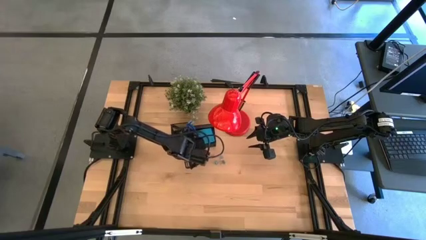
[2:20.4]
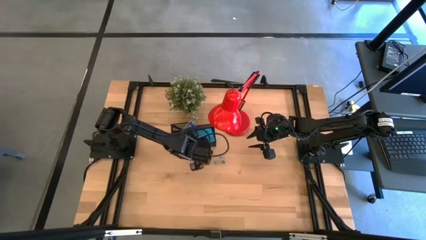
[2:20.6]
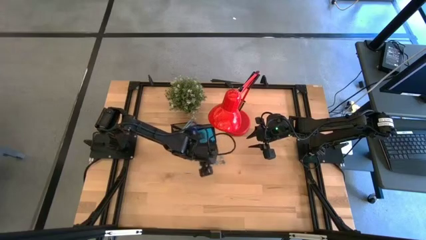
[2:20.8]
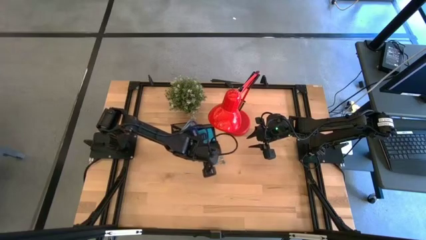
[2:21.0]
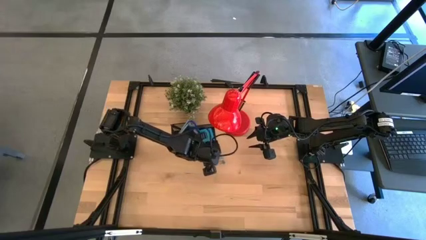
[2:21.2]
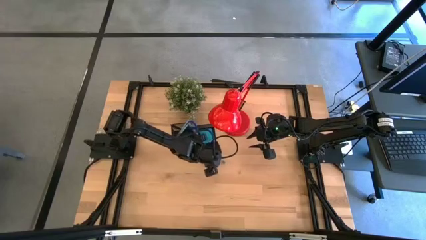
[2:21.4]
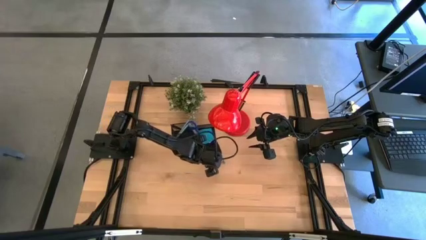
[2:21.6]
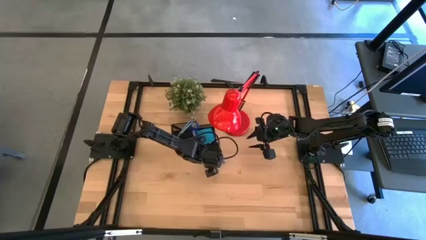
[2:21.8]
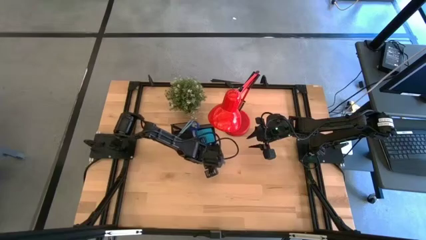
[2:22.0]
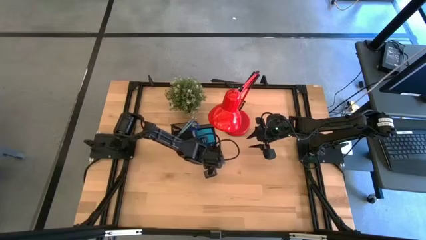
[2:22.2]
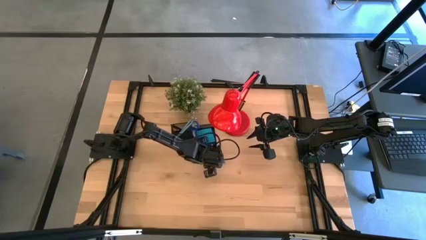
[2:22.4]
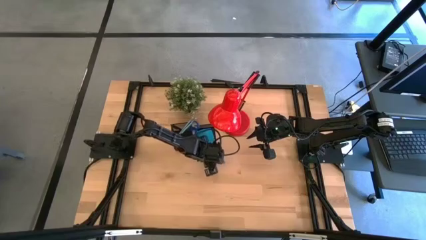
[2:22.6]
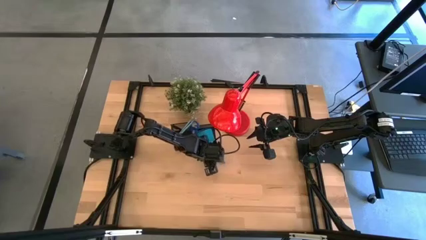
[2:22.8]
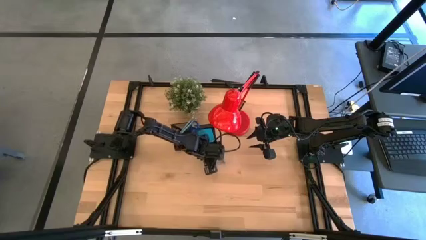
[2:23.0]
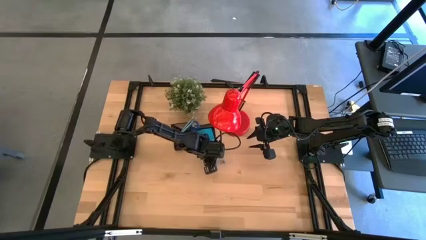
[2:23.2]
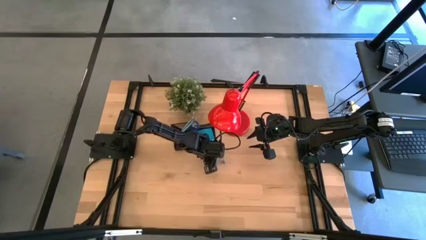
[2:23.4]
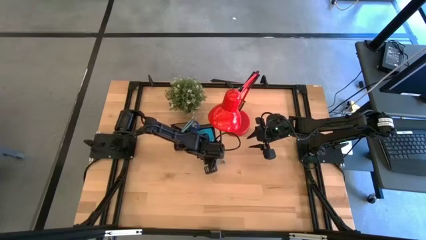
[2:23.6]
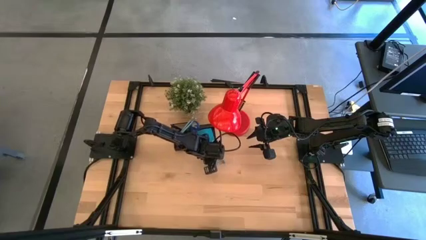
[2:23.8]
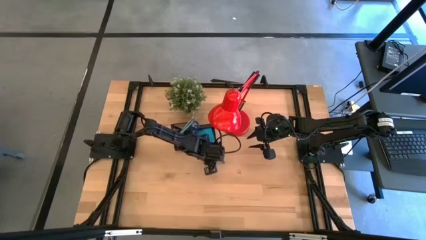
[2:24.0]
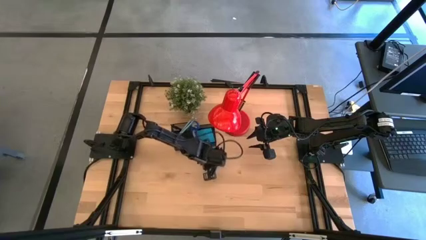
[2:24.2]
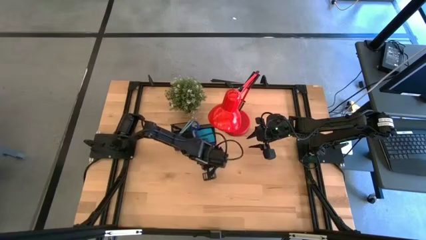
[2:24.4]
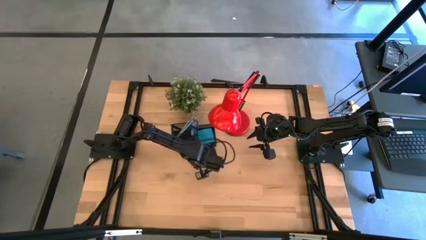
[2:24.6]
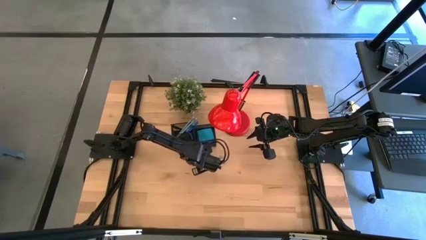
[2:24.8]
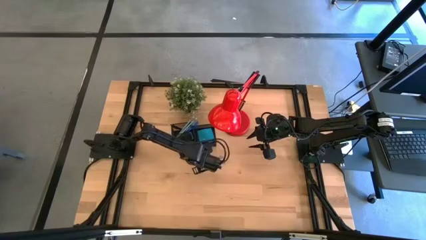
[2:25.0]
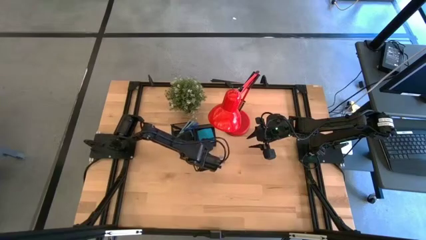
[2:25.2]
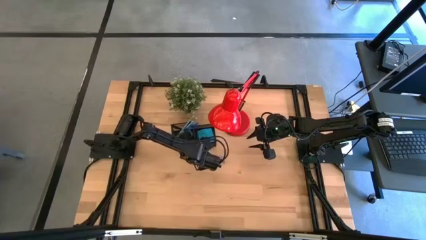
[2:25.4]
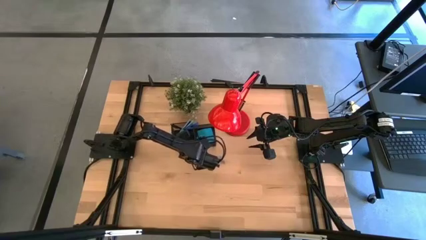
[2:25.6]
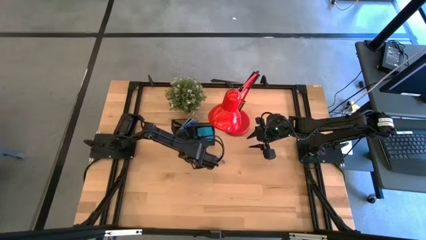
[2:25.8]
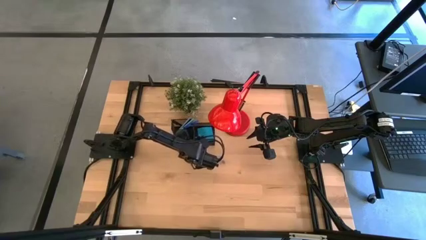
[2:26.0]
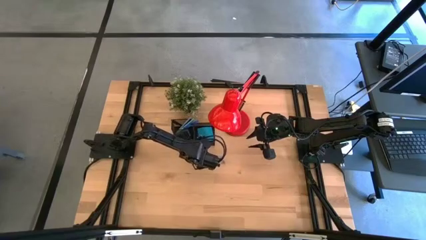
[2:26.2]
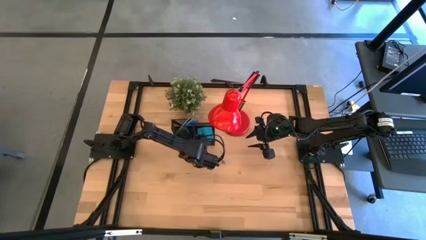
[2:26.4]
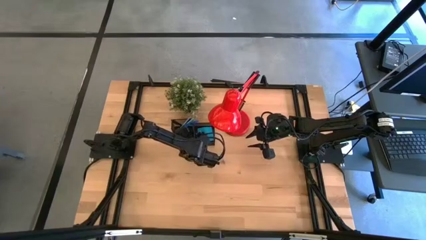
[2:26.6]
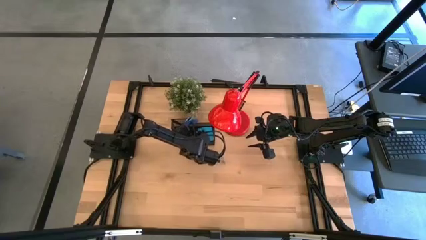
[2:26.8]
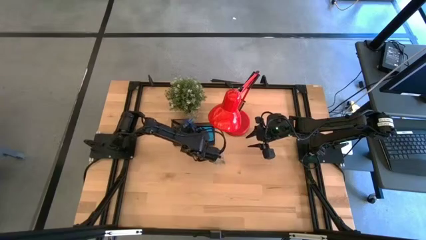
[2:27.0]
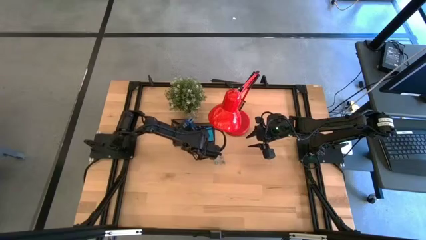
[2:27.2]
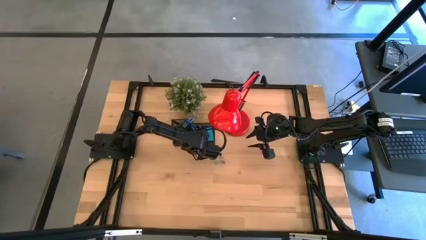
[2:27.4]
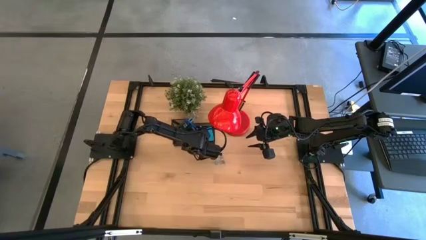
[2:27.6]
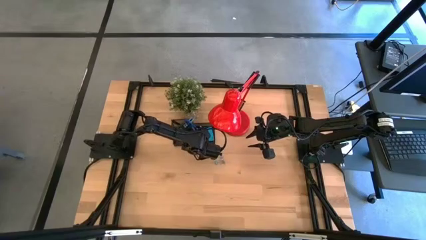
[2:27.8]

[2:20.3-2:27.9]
Task: Pick and place office supplies into organizer
Put the pink binder clip into the black desk organizer

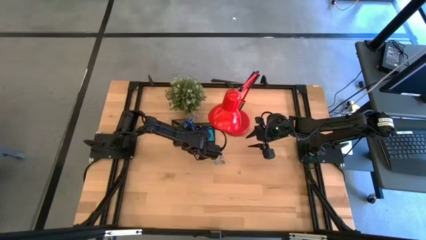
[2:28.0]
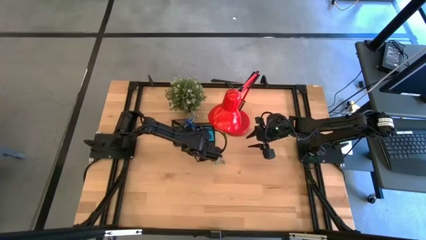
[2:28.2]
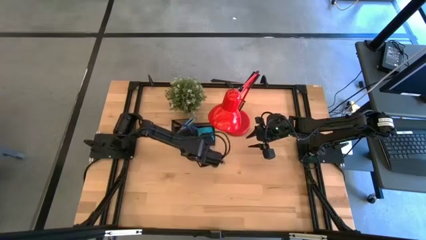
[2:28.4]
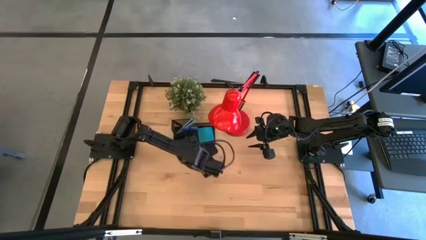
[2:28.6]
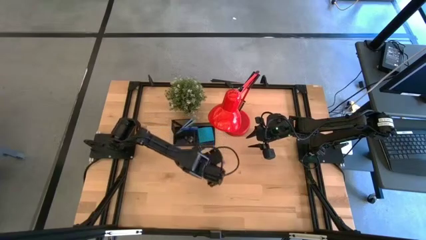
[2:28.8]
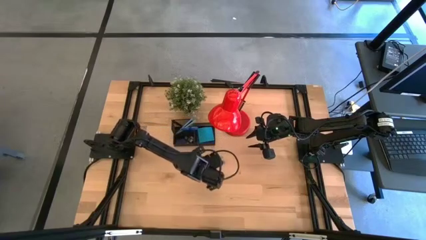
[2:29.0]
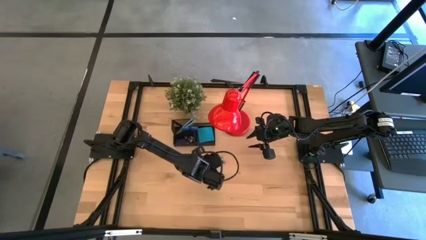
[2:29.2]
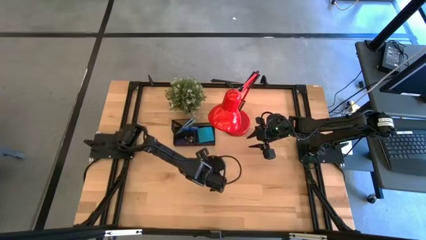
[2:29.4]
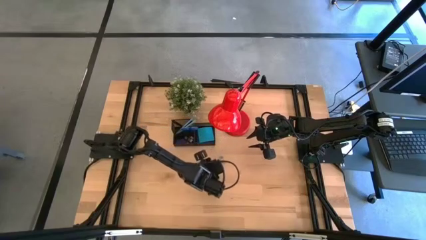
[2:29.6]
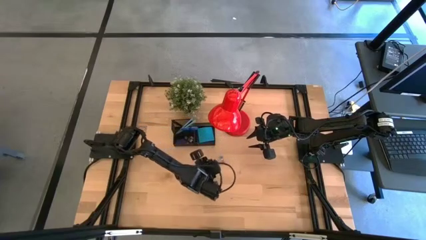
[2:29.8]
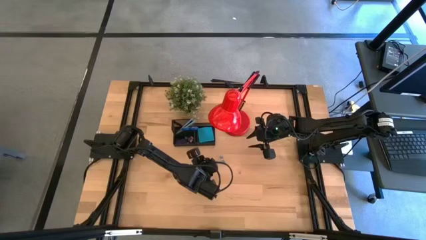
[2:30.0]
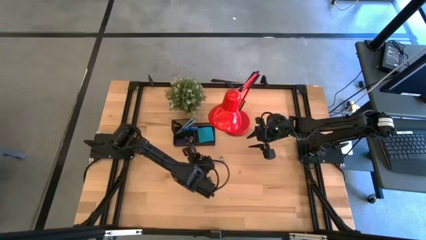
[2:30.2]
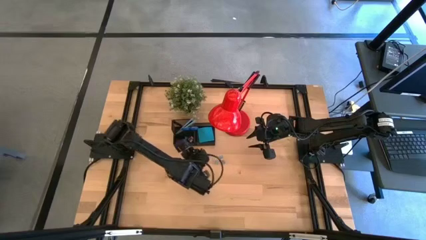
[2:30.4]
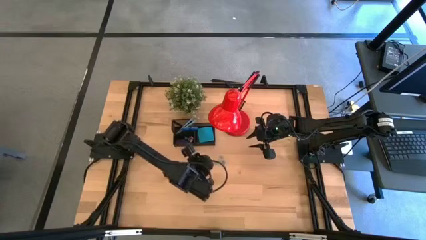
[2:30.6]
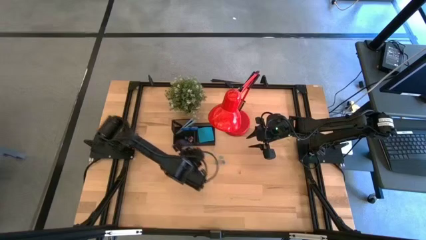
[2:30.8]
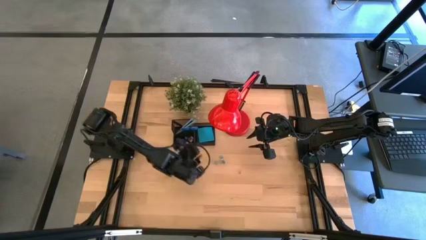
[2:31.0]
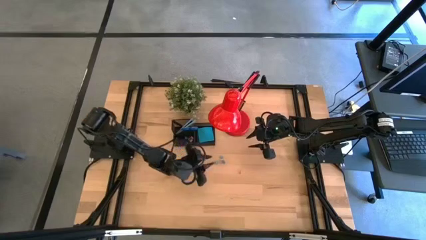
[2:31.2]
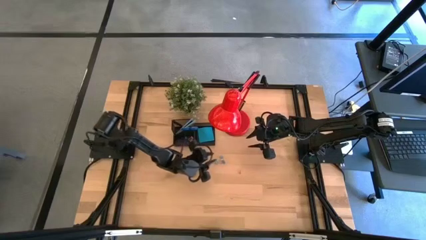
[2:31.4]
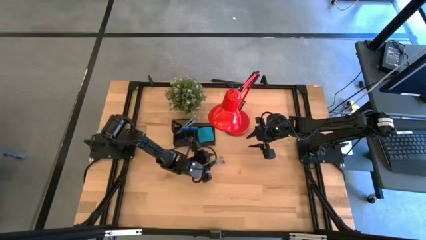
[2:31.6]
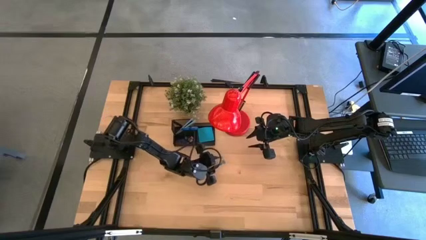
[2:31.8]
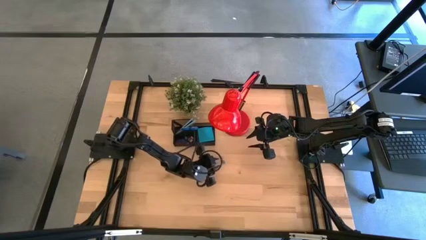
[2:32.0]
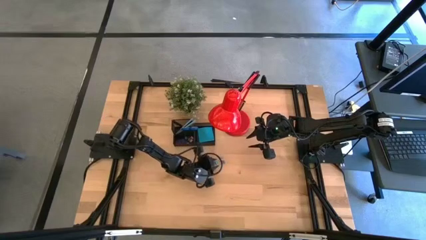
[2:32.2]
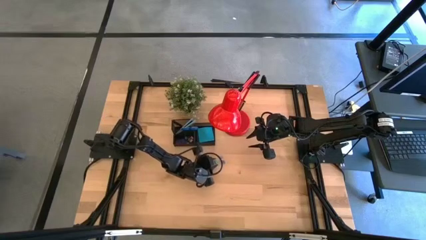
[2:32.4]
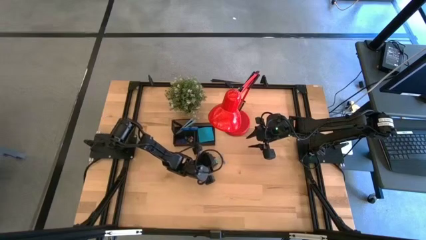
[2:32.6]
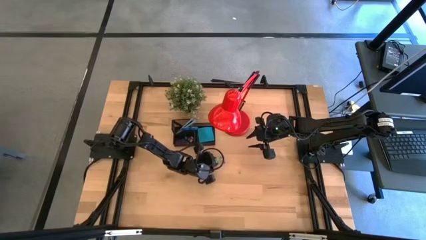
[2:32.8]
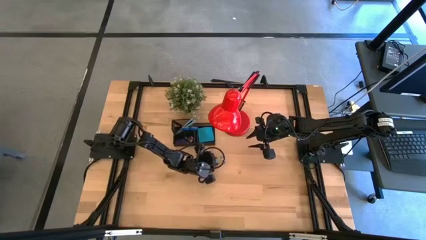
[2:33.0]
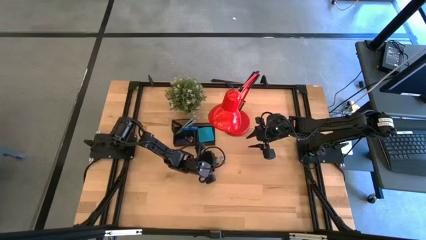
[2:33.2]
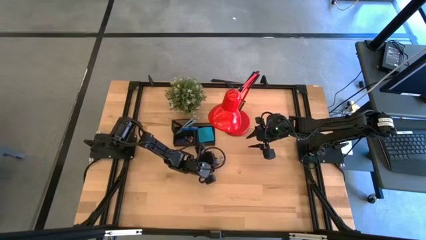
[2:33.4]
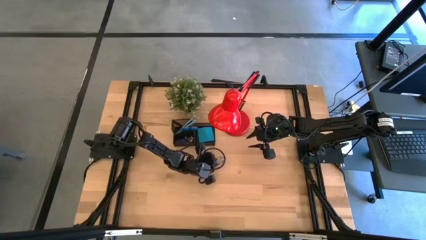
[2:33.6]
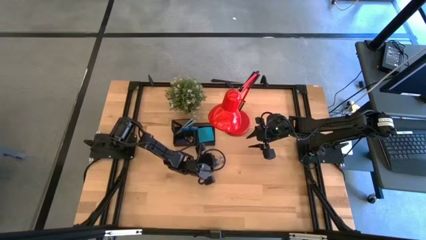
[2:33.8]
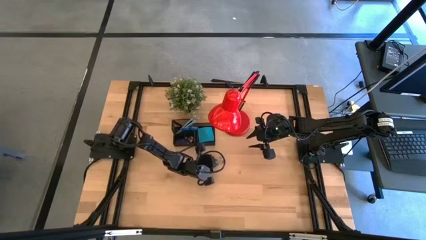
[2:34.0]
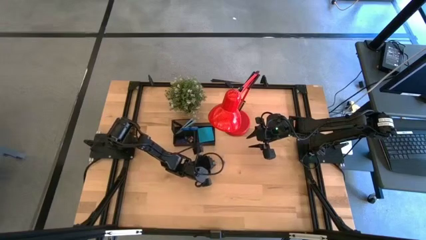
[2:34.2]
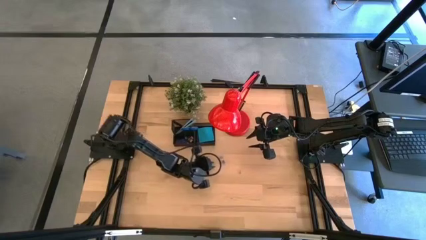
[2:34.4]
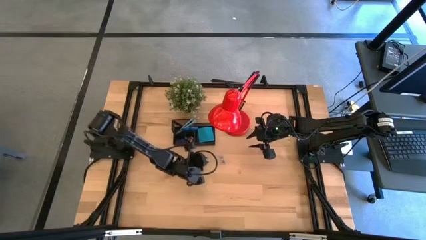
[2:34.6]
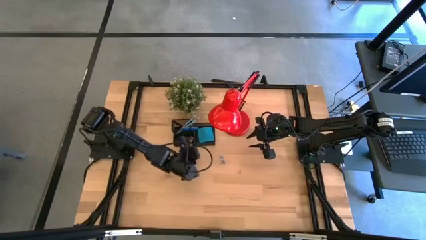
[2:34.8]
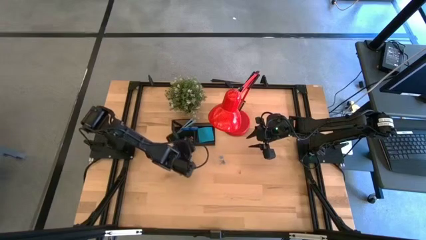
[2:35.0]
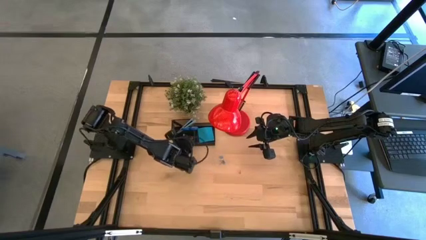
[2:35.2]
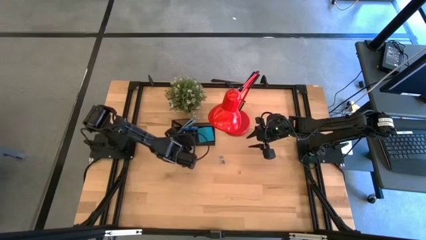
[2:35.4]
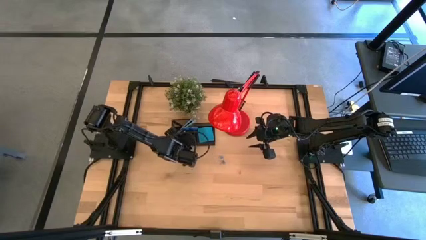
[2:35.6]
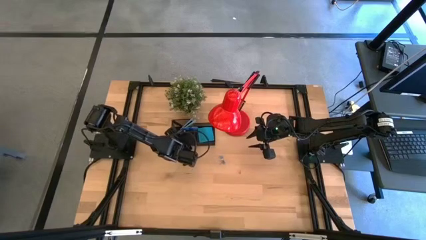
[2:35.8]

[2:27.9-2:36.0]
Put the left blue binder clip into the black desk organizer

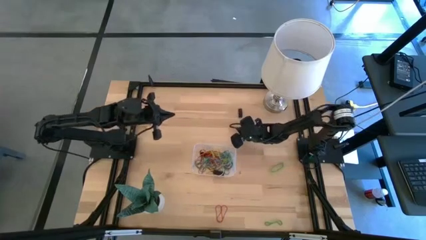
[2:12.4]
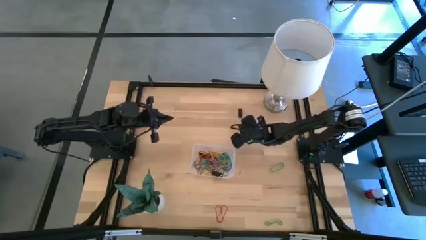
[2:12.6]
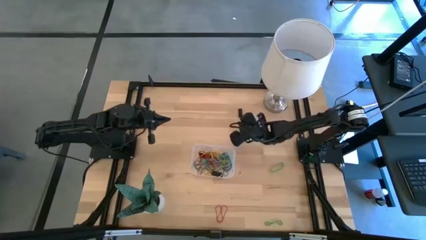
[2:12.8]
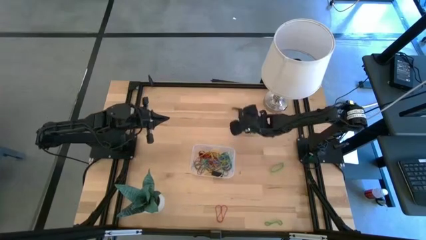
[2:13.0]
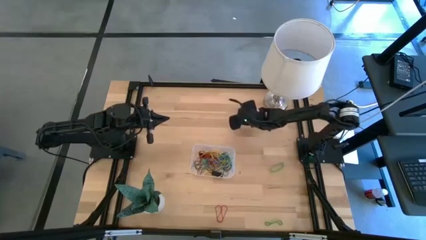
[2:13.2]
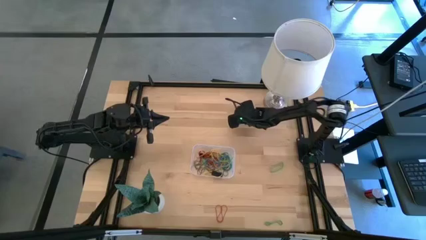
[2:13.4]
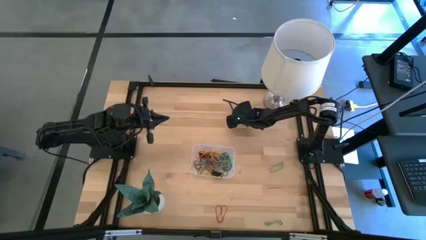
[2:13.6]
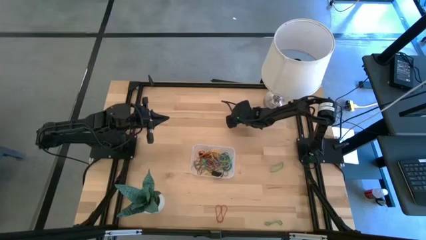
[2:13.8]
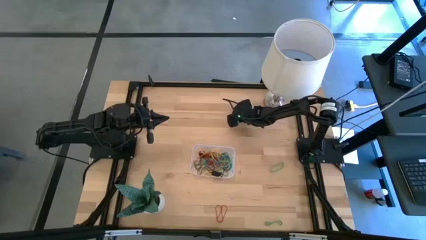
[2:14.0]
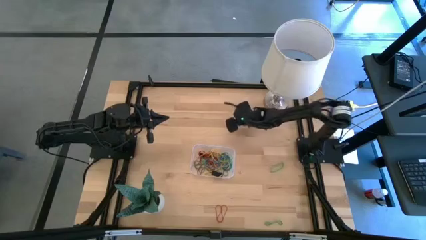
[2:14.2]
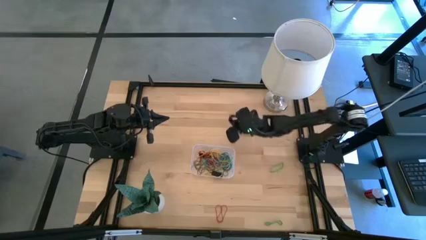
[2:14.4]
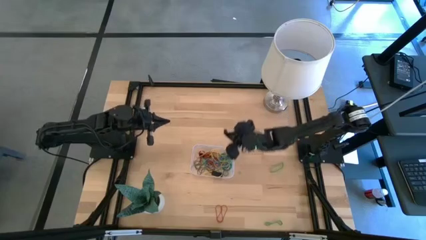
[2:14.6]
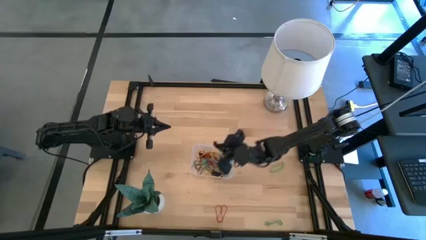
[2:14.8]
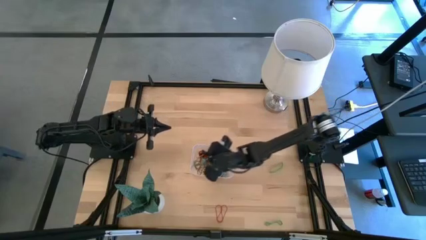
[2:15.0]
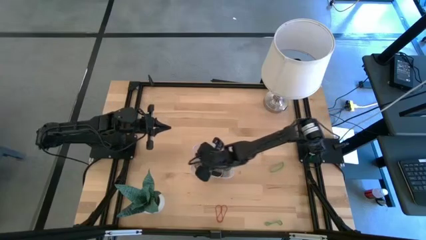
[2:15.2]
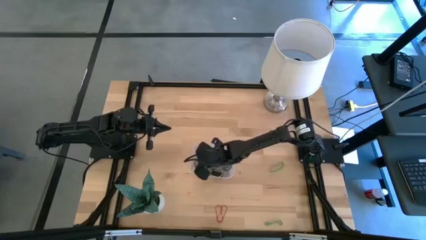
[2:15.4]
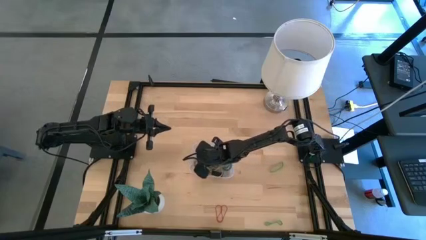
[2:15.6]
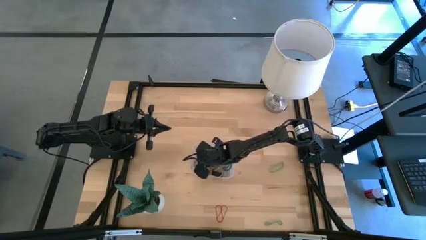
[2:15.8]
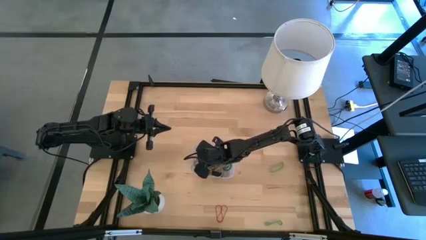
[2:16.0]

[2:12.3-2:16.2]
Task: Pick and place rubber bands into bin
Put the black rubber band into the transparent bin
